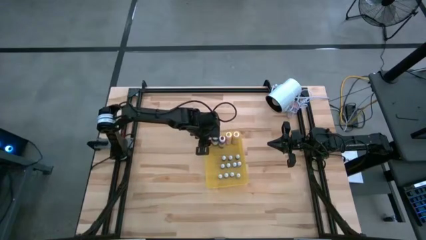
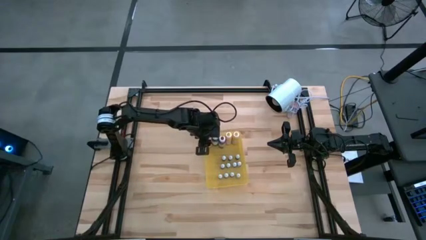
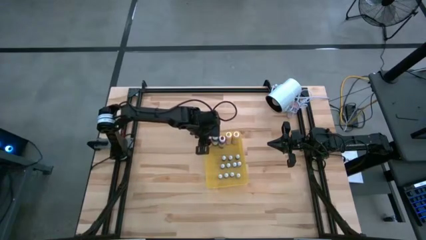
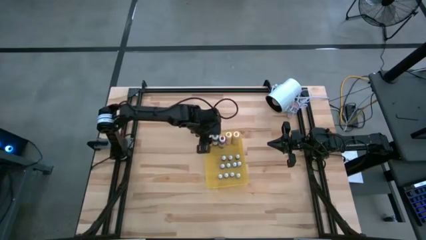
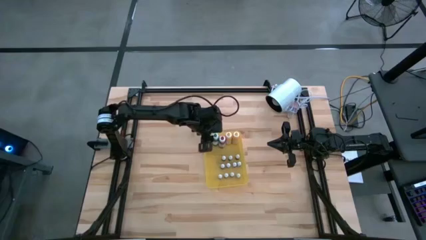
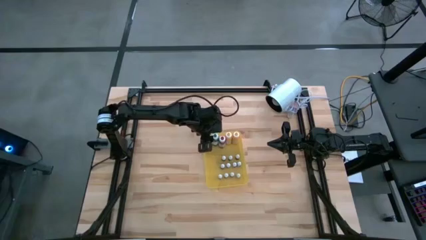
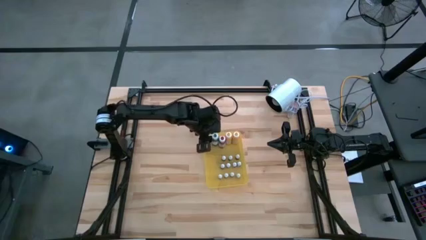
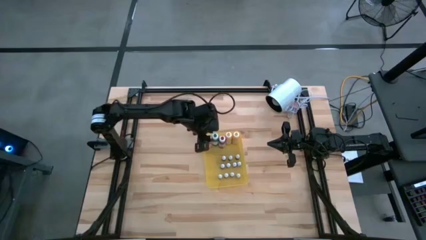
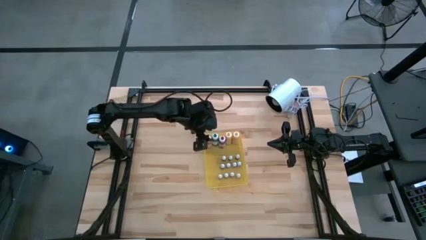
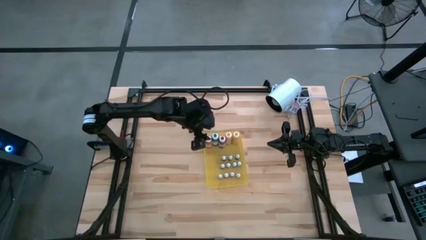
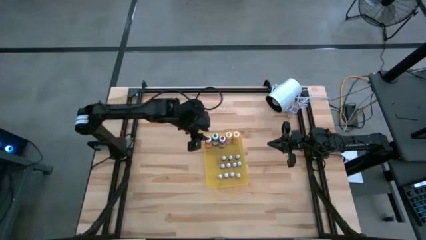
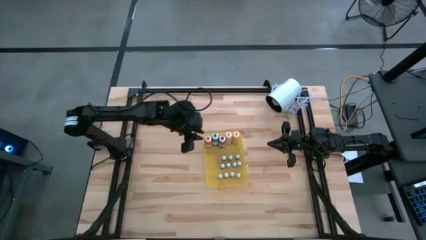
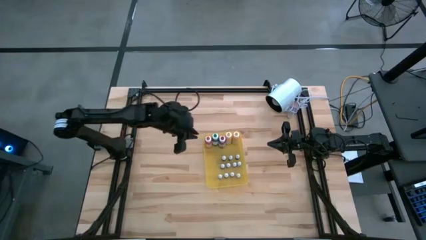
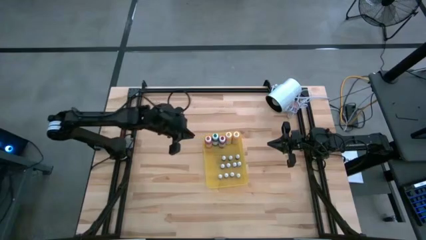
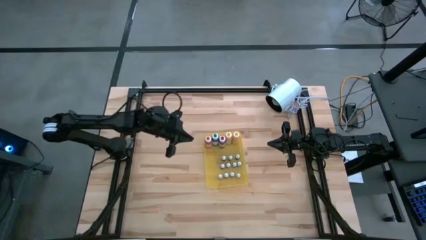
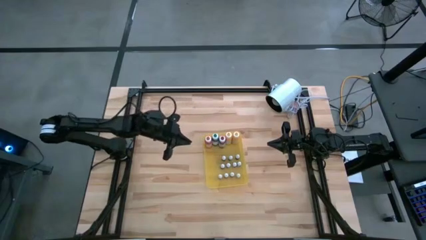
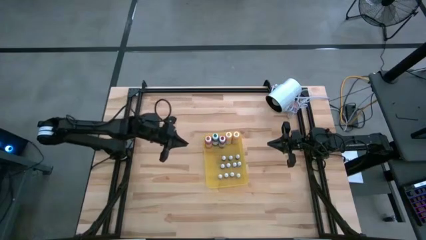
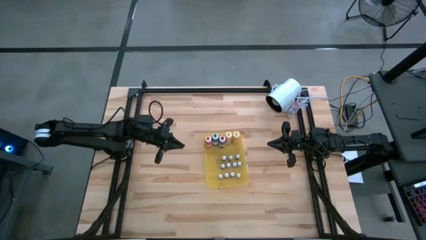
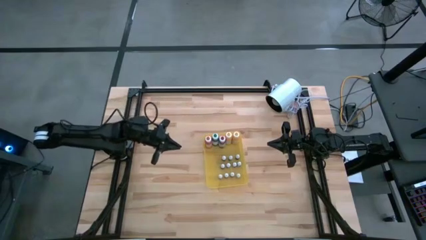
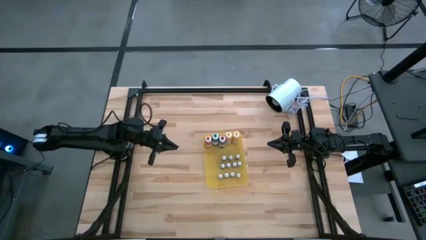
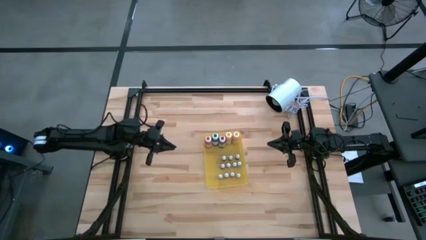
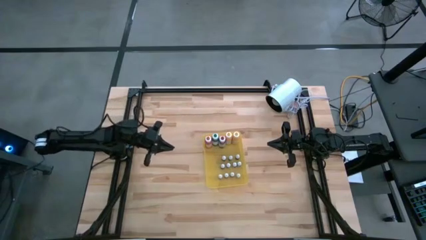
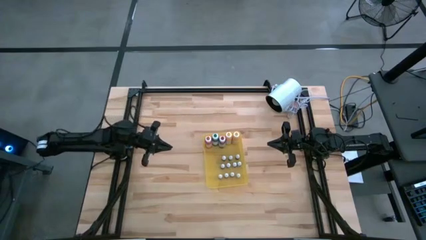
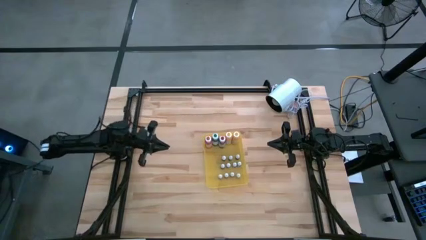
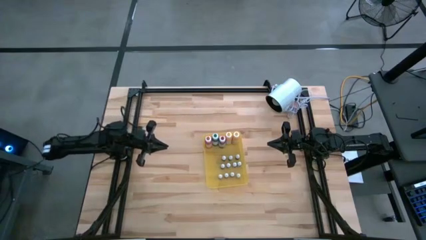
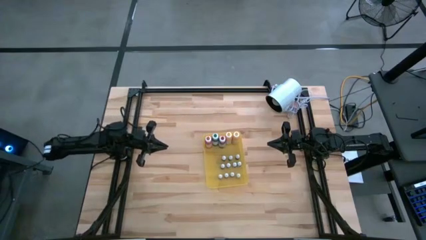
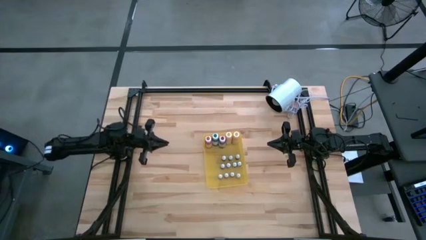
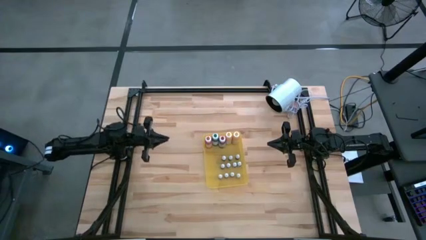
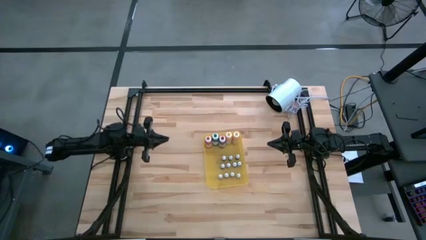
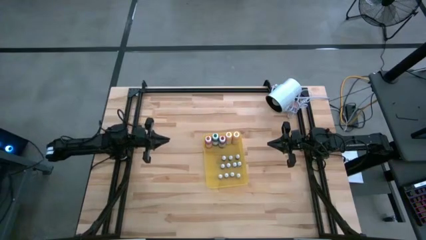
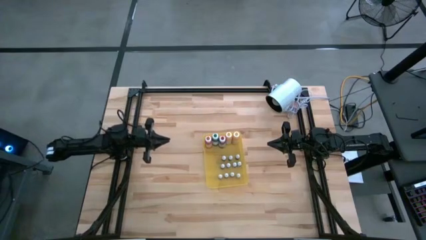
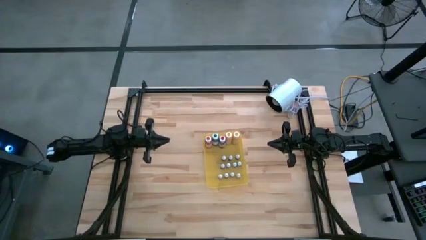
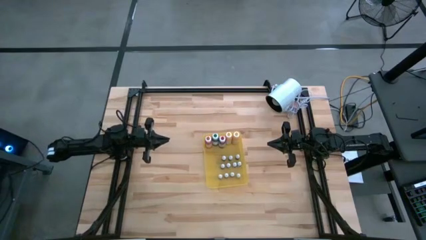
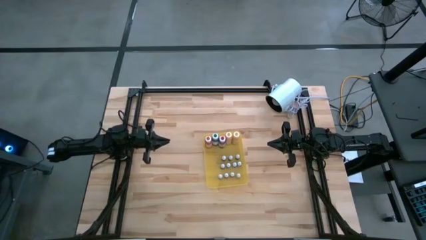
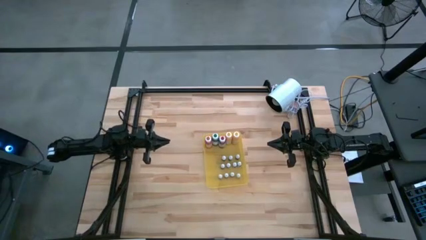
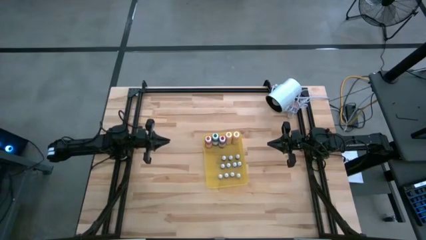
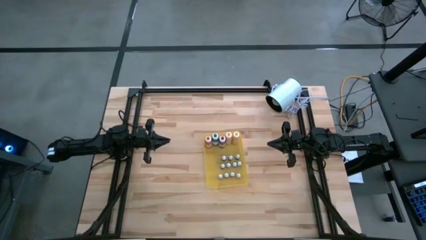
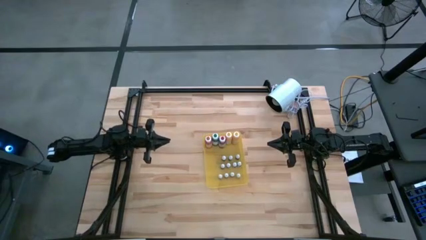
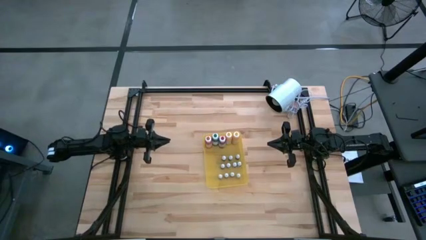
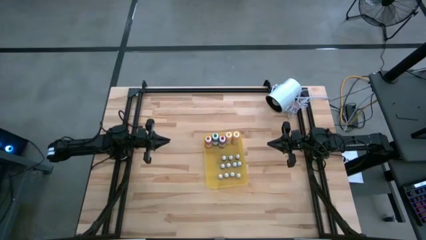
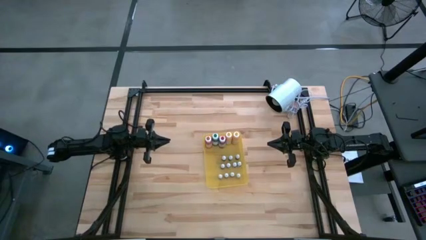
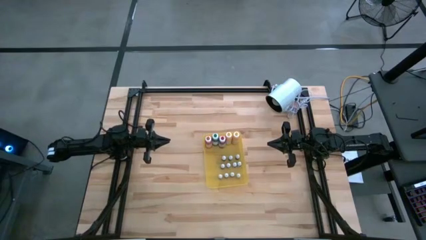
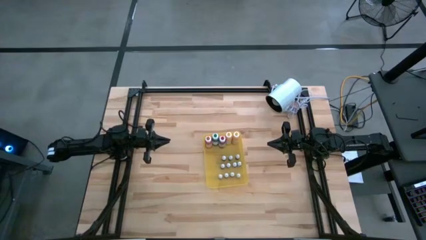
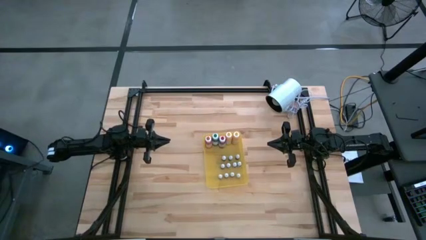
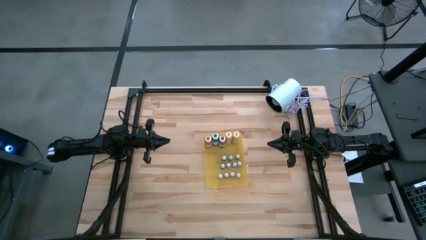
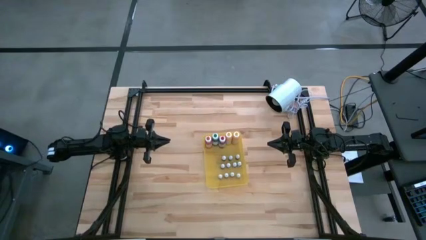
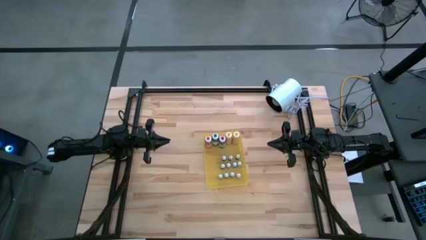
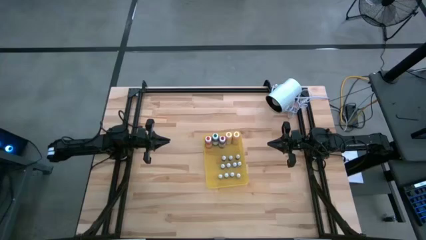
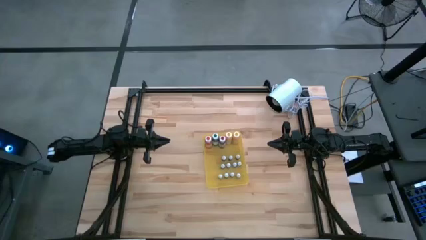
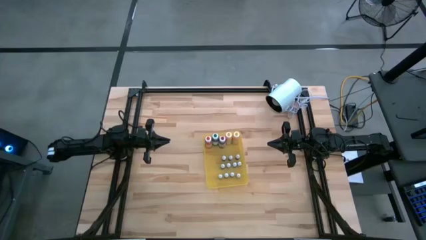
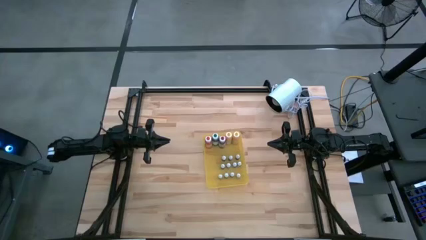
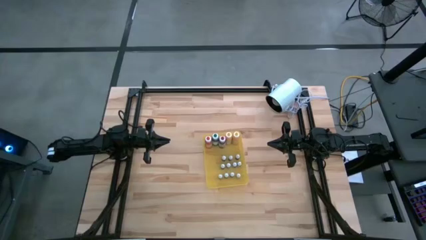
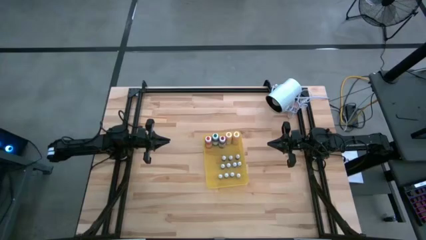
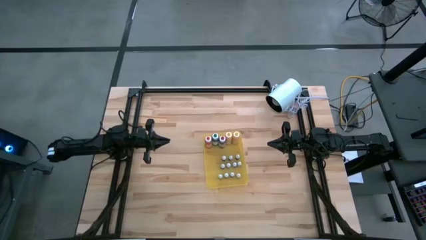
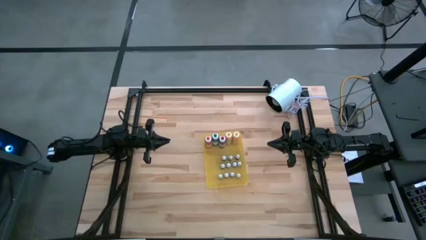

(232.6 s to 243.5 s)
Task: Pick & Place food coloring
Return to Home Position

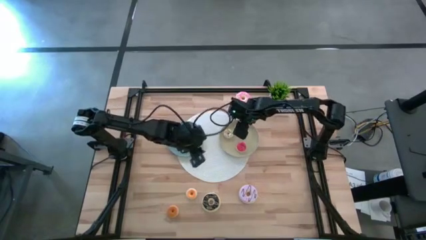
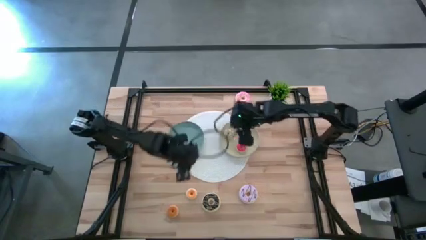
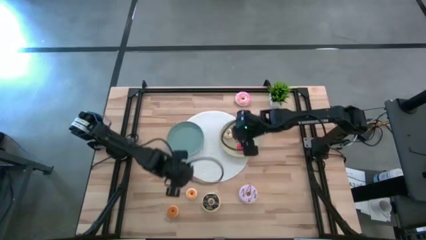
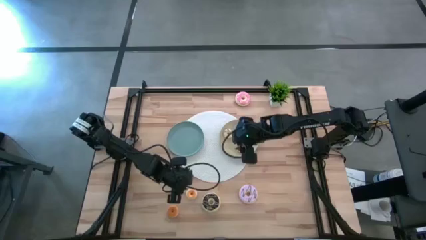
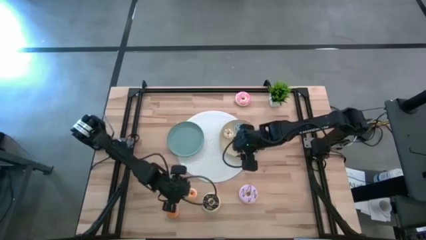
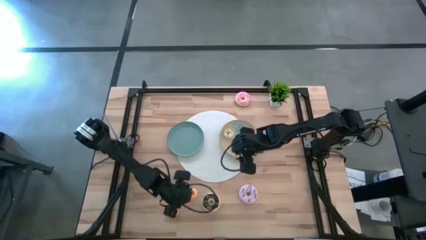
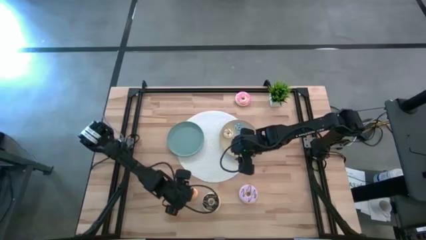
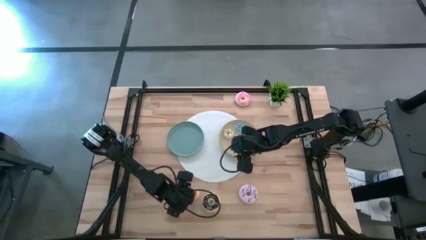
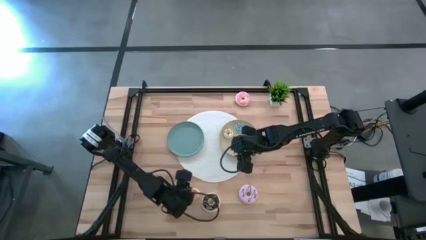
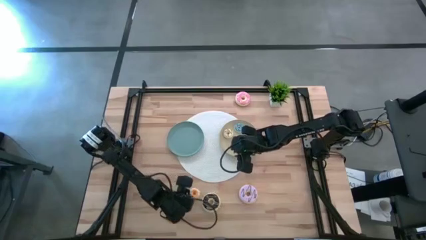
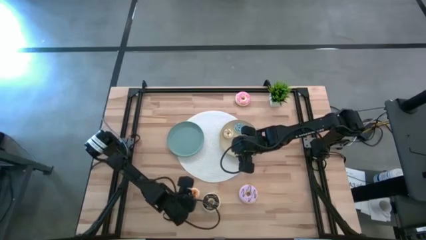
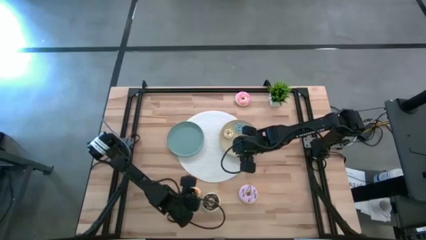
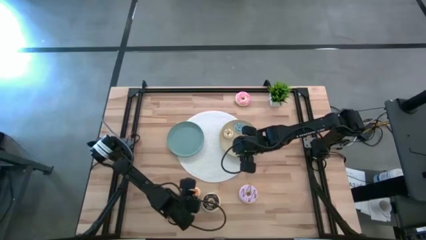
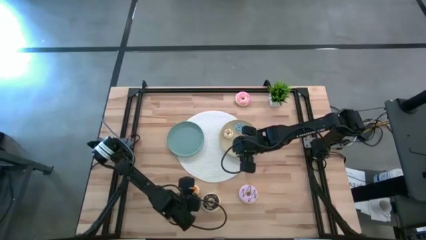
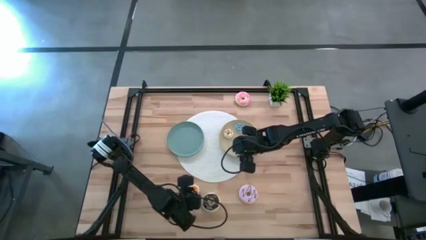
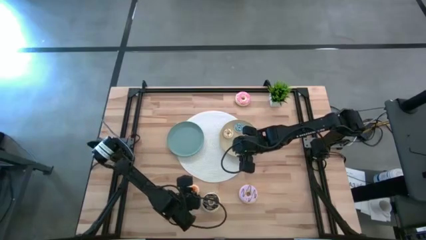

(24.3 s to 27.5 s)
Task: Pick & Place donuts
Put the top small yellow donut on the brown plate
